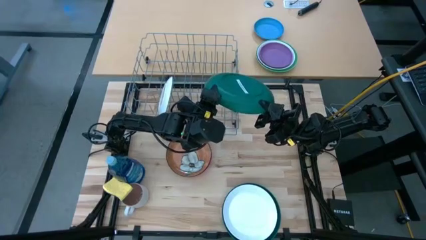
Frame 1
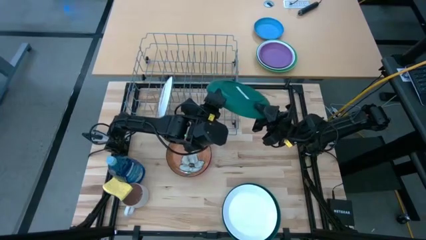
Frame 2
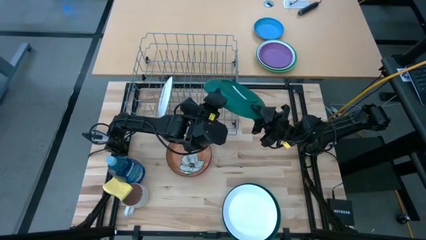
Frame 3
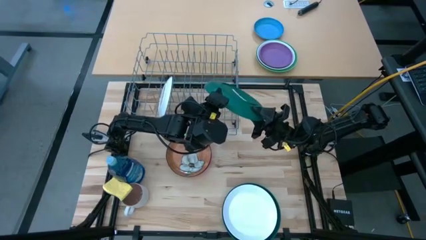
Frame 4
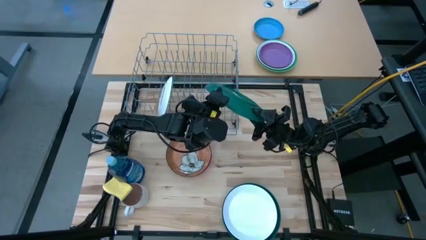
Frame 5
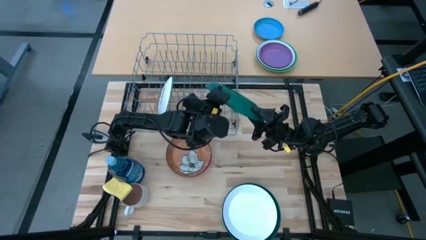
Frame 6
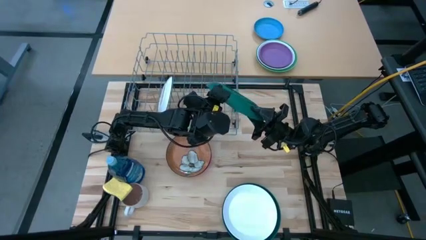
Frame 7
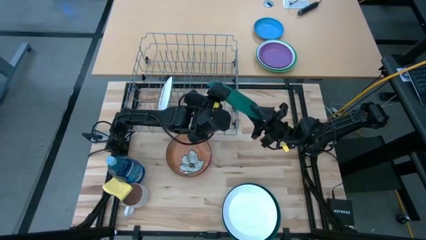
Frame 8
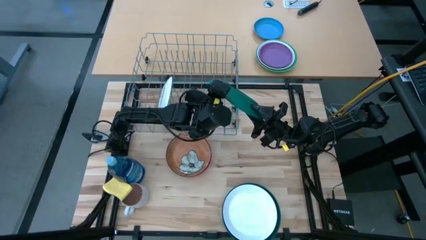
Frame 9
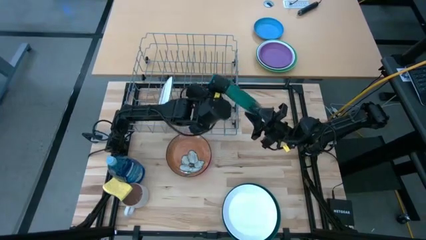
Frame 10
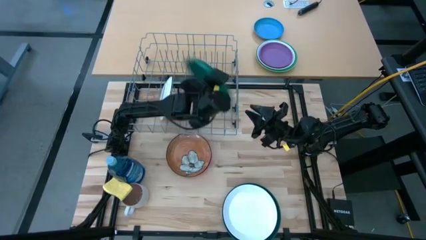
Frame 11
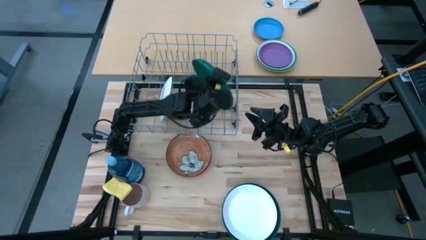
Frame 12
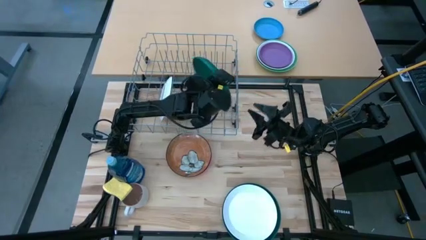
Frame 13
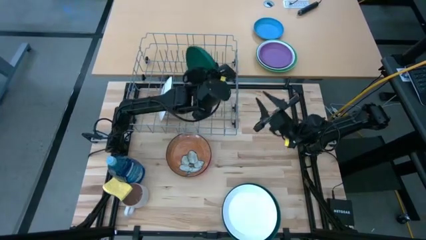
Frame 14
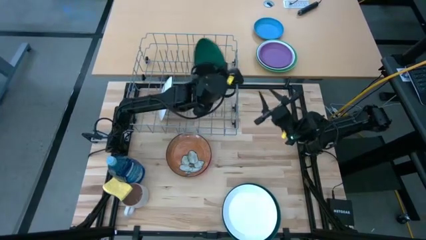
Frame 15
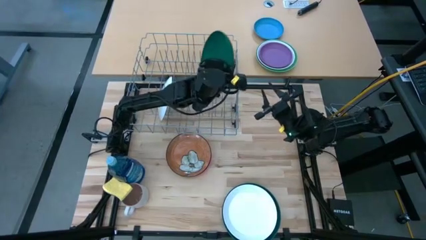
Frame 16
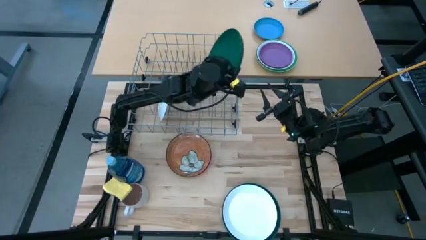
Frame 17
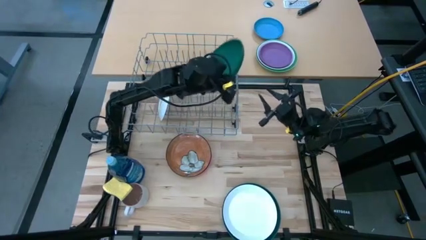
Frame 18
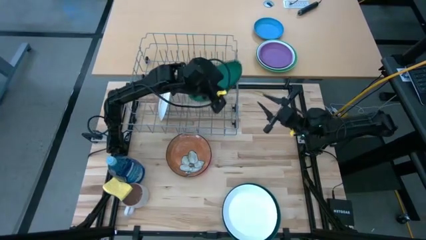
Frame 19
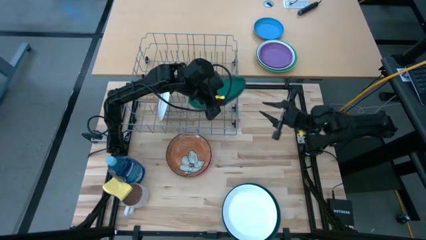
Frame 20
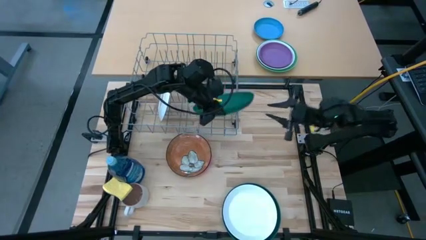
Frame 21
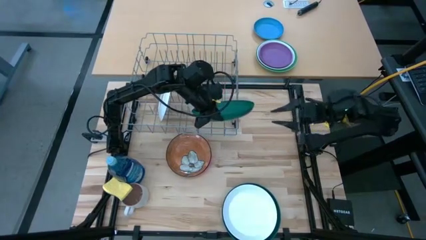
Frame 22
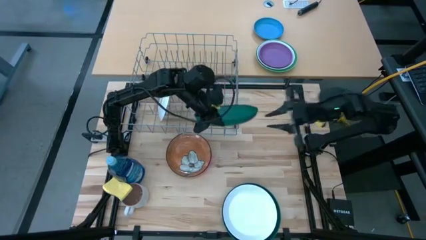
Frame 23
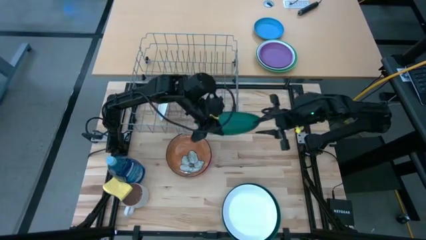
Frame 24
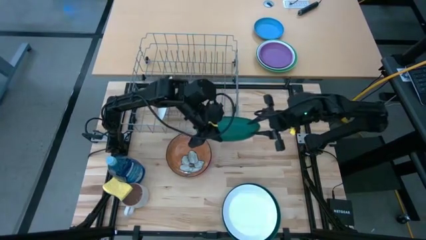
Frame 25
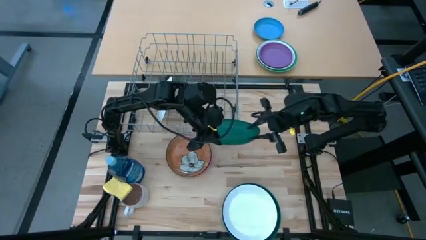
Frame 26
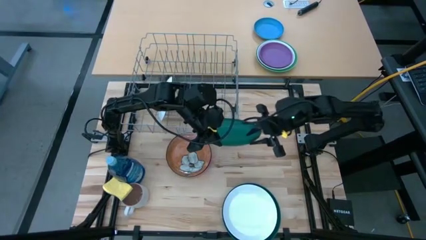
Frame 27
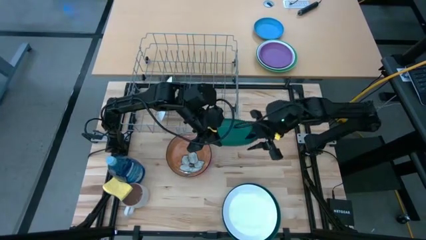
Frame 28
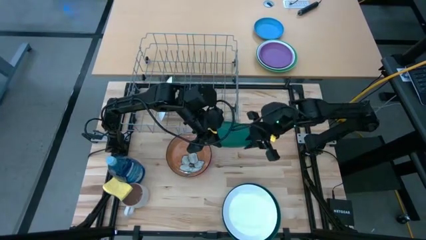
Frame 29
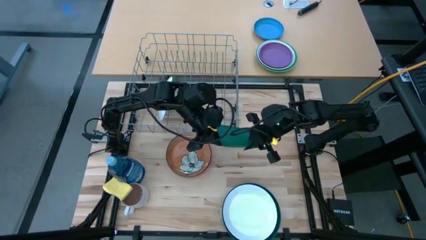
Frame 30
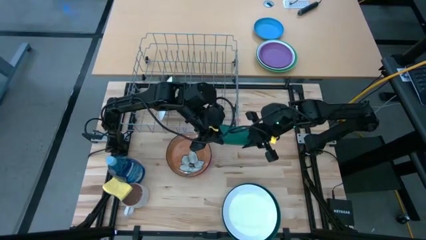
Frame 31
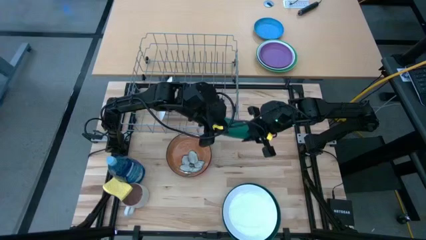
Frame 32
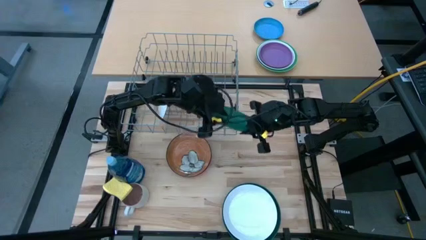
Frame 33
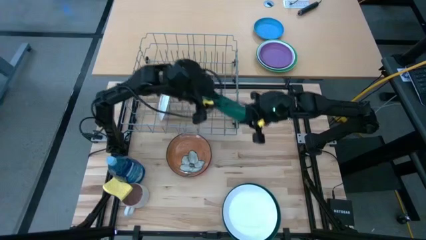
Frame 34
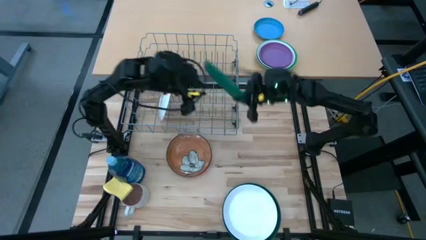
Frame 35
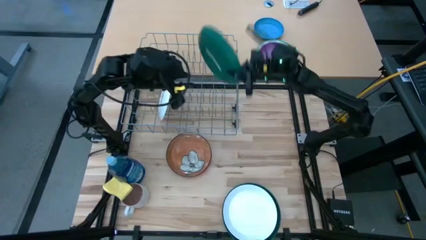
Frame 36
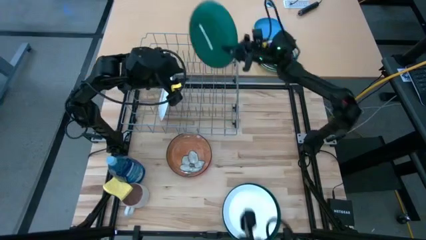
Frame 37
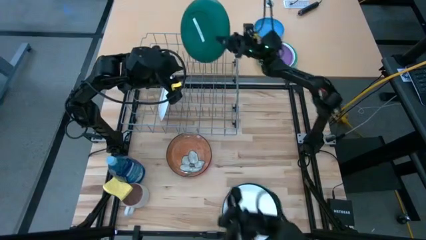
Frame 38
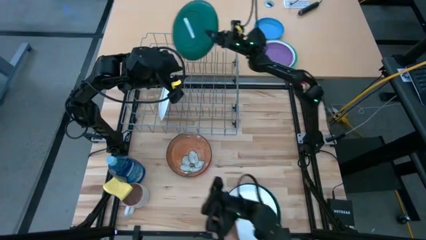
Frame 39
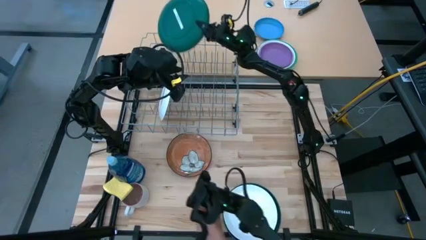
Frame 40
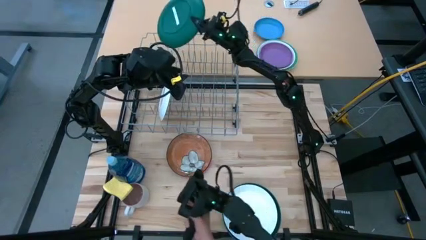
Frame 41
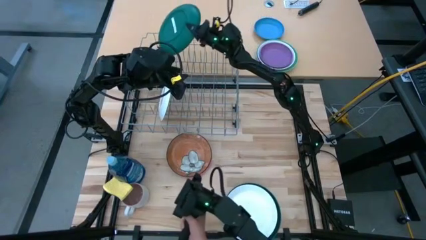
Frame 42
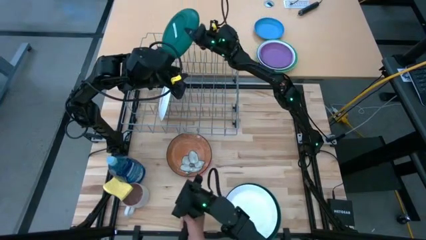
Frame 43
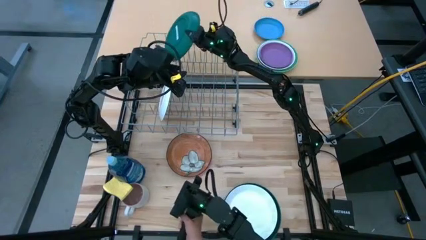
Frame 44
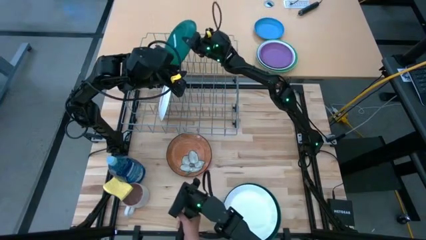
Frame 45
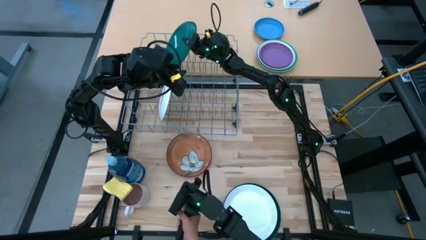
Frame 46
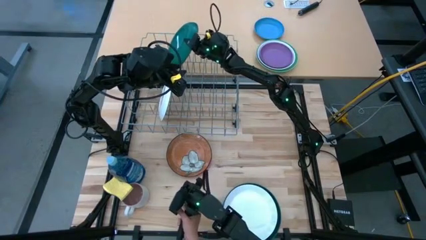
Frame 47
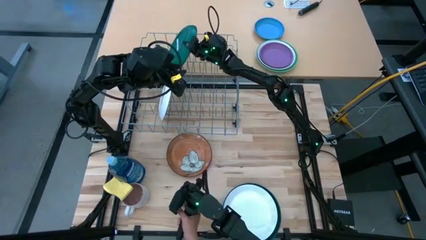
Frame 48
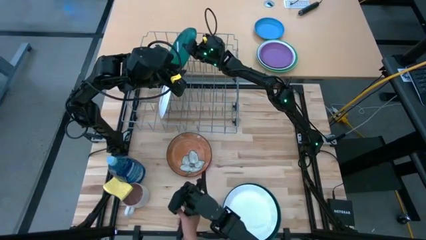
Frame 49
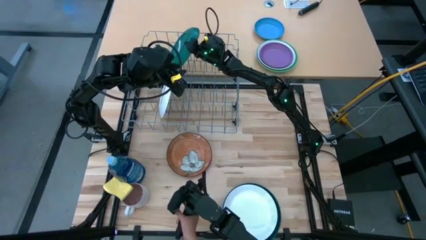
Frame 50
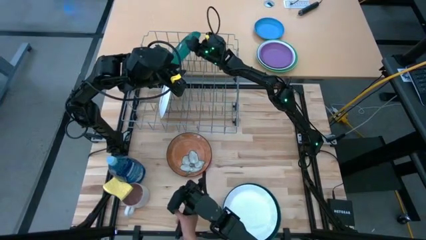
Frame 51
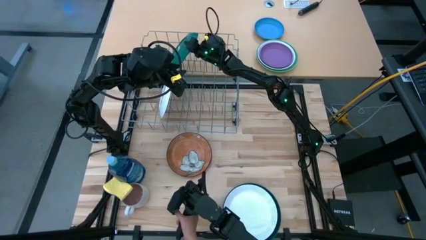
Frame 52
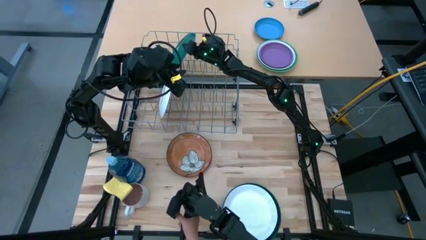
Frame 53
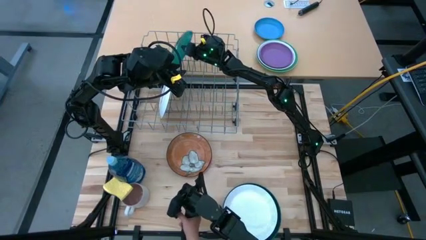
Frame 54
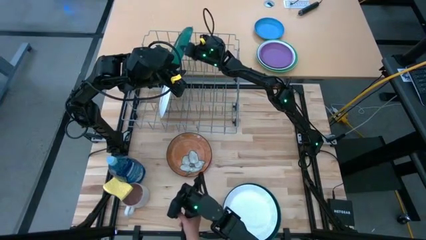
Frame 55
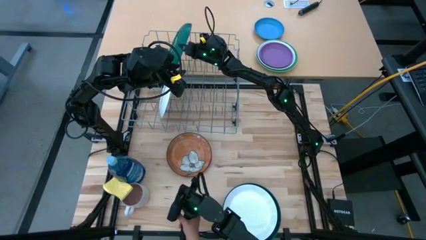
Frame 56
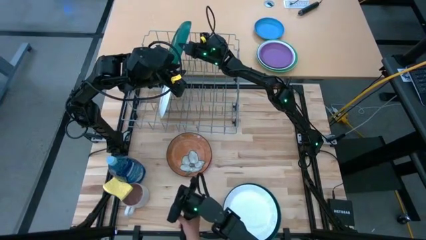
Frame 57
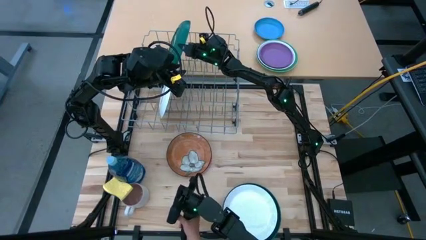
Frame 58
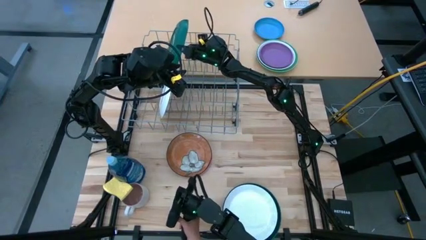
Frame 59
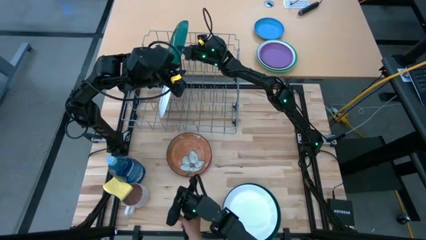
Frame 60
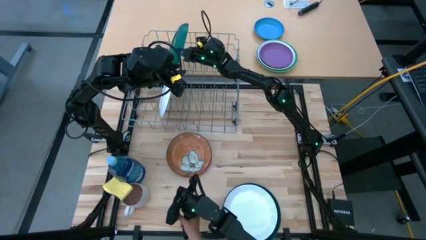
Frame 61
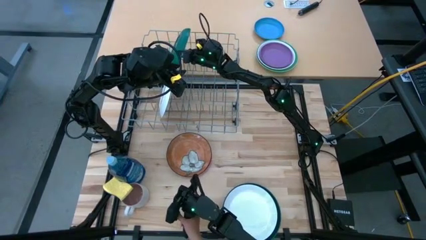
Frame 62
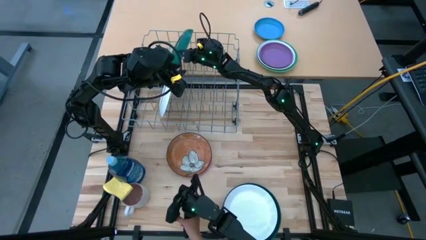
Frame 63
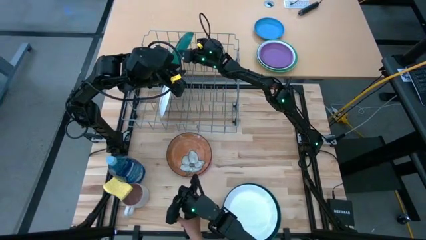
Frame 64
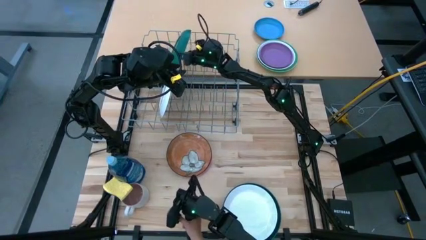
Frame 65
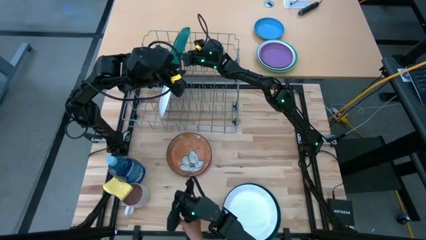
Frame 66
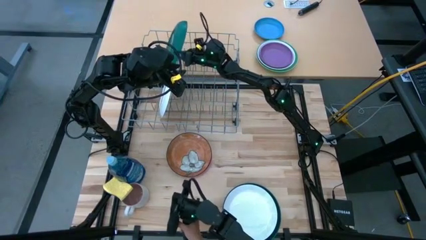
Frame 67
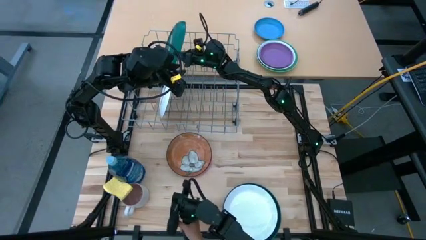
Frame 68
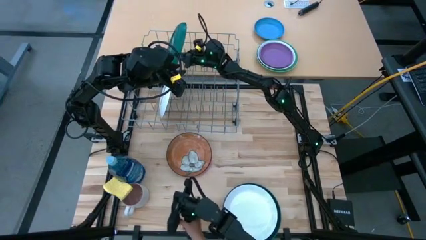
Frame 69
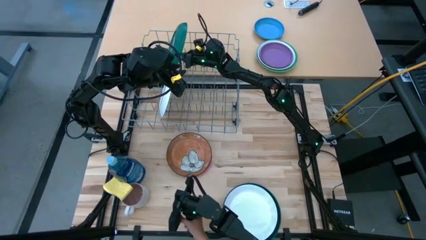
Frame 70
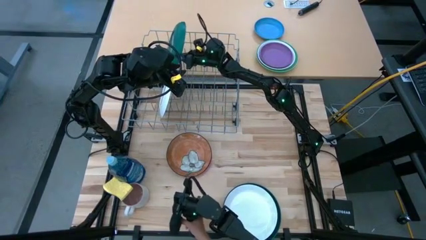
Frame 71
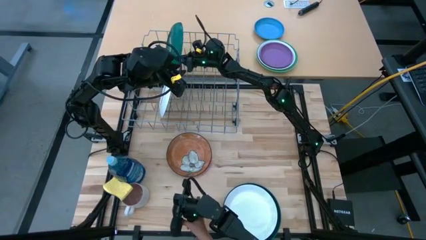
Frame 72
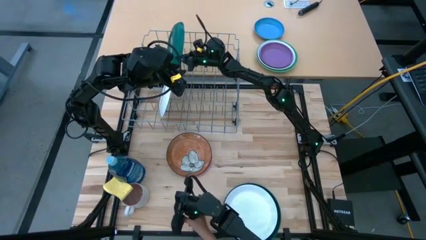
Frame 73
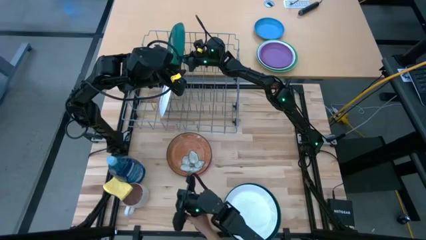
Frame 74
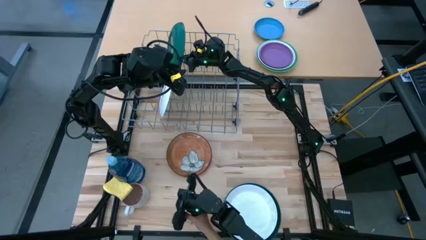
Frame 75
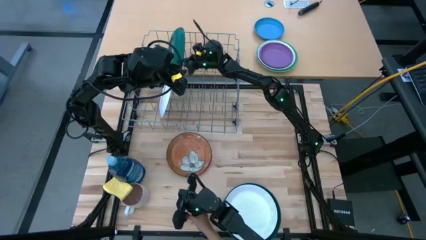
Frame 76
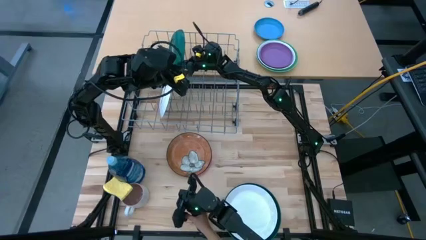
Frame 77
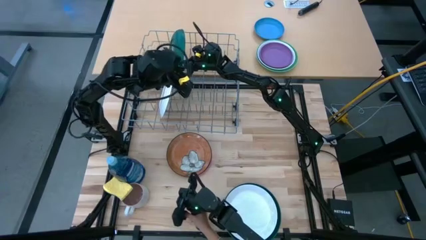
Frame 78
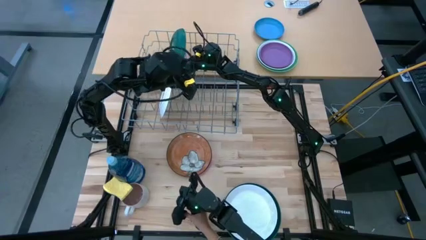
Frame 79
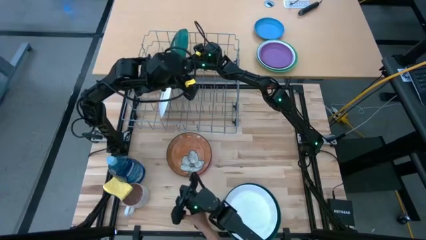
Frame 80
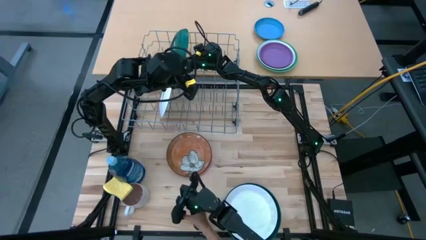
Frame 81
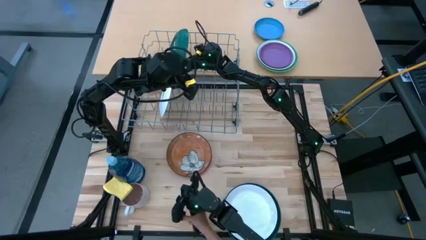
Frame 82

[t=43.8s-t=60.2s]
Task: Sort dishes
Put the top green plate on the dish rack
